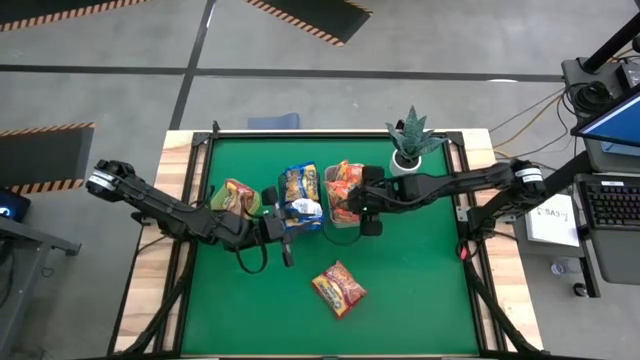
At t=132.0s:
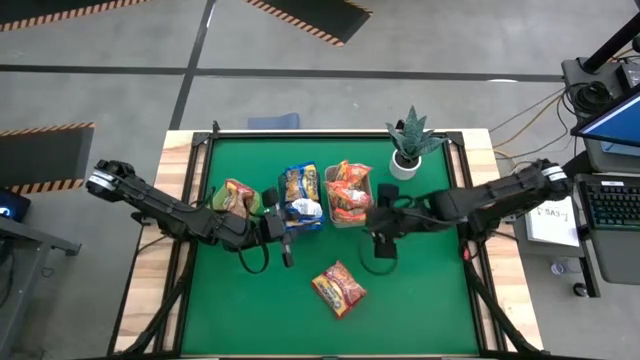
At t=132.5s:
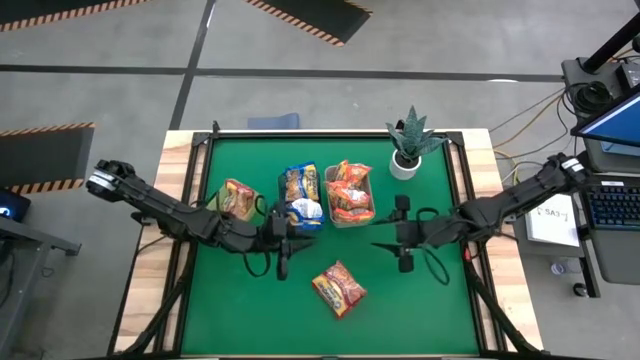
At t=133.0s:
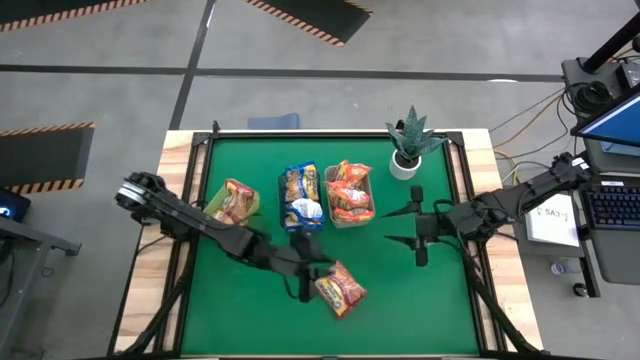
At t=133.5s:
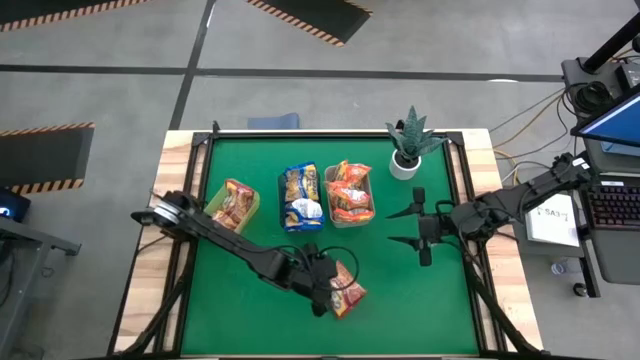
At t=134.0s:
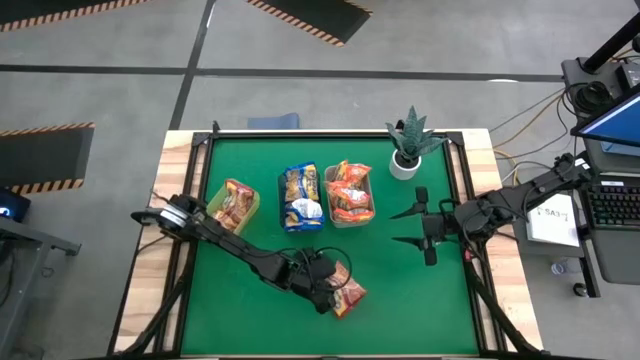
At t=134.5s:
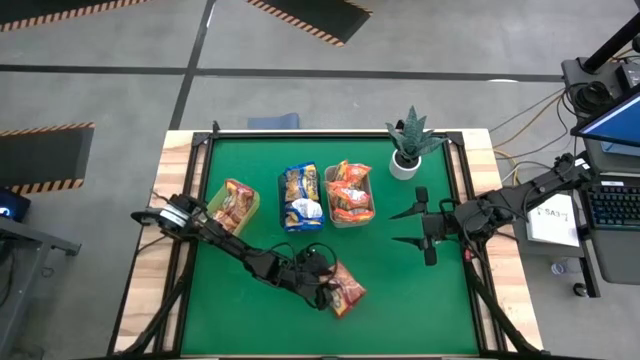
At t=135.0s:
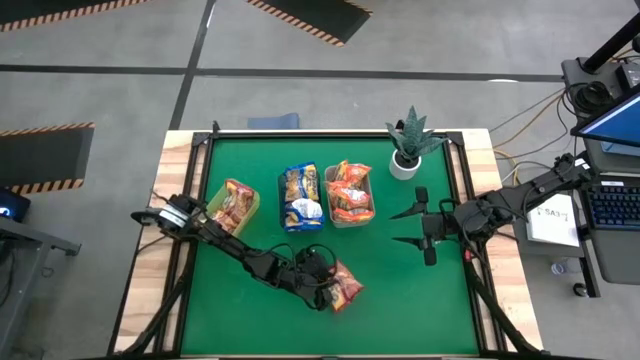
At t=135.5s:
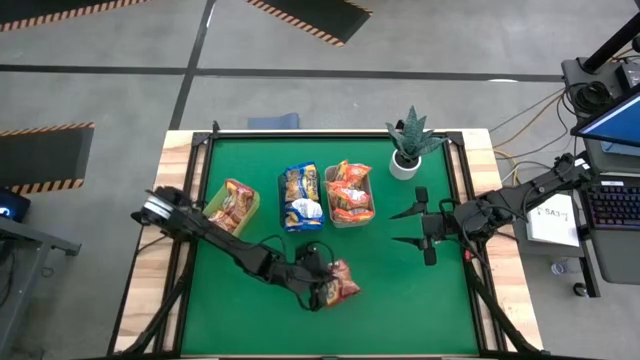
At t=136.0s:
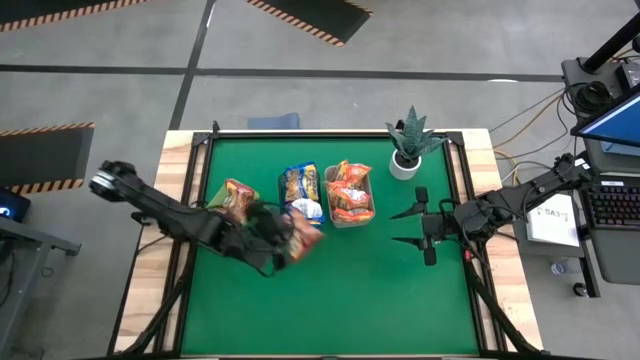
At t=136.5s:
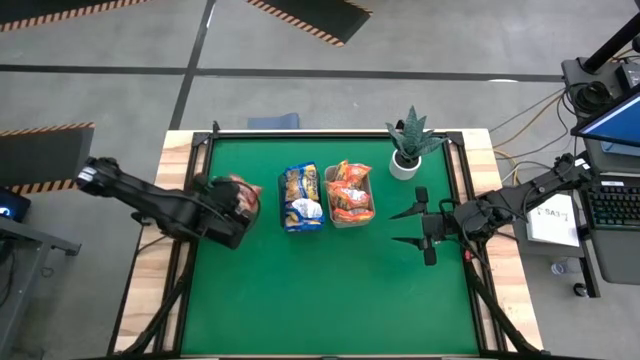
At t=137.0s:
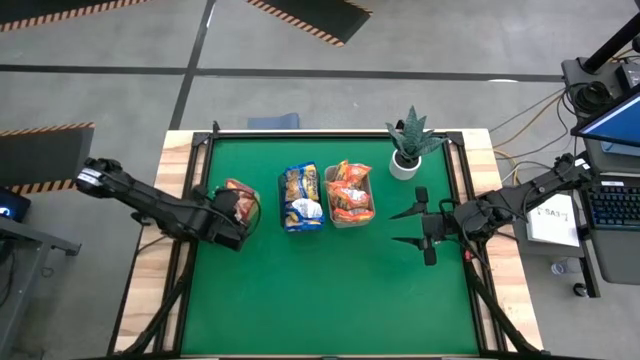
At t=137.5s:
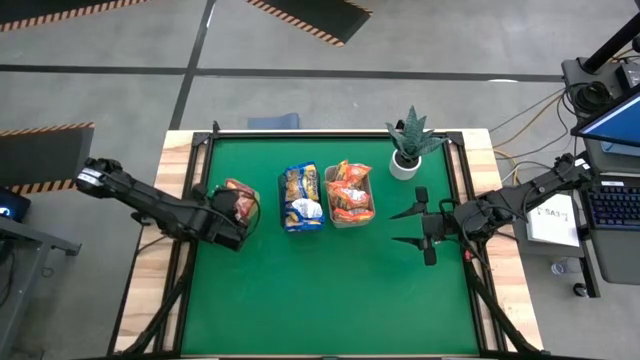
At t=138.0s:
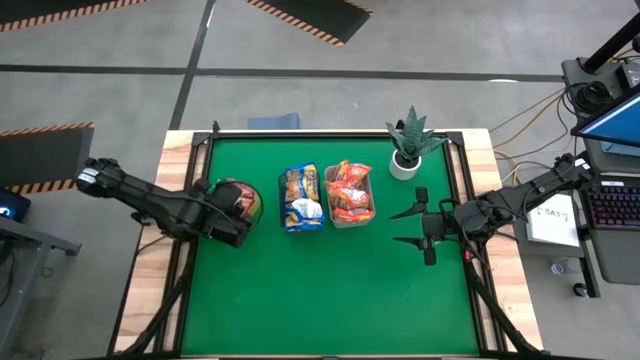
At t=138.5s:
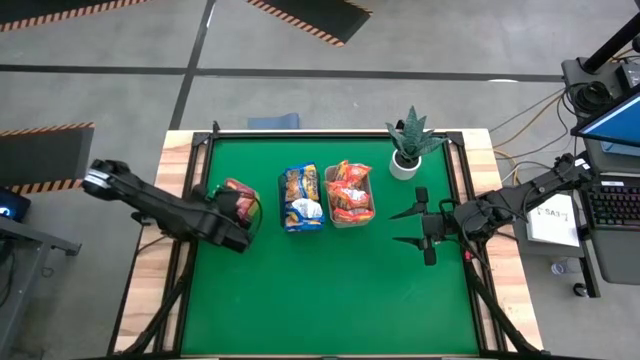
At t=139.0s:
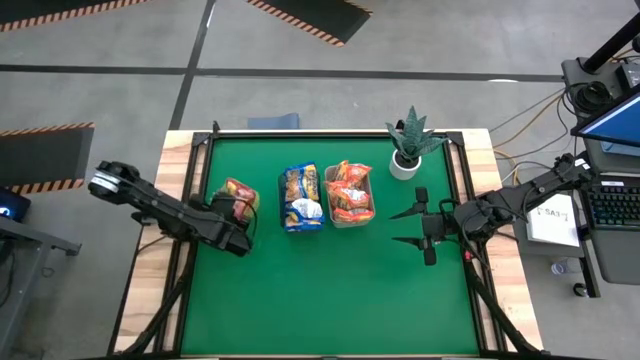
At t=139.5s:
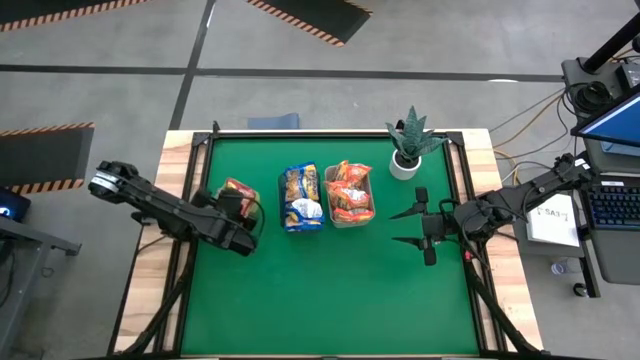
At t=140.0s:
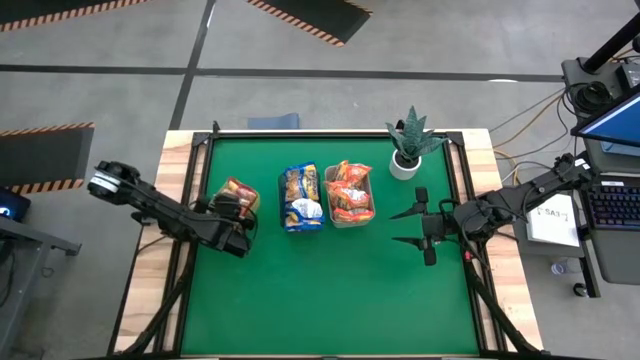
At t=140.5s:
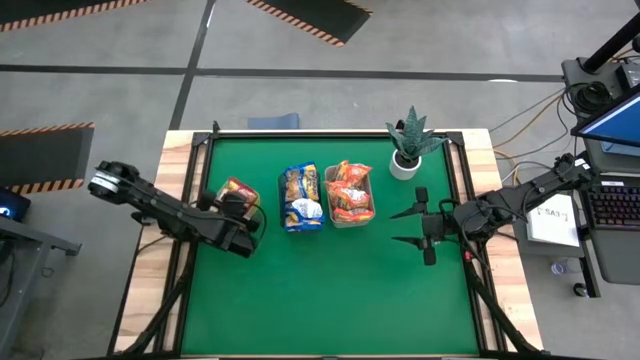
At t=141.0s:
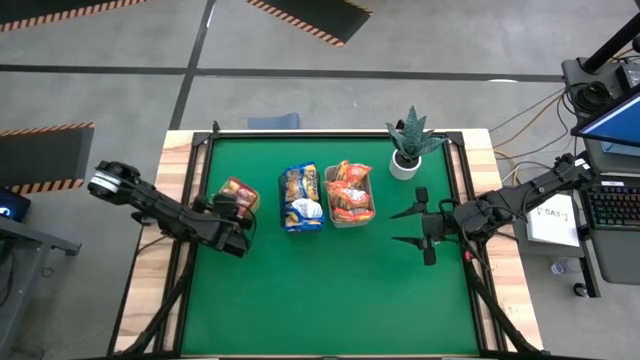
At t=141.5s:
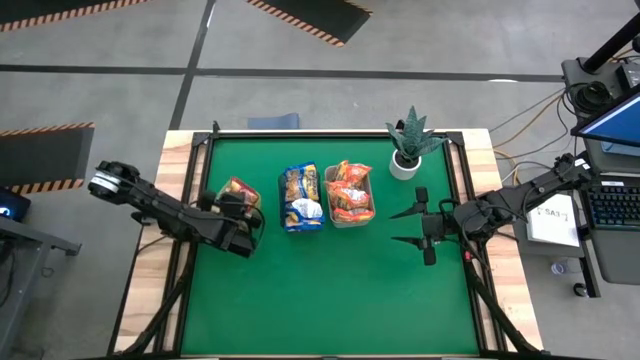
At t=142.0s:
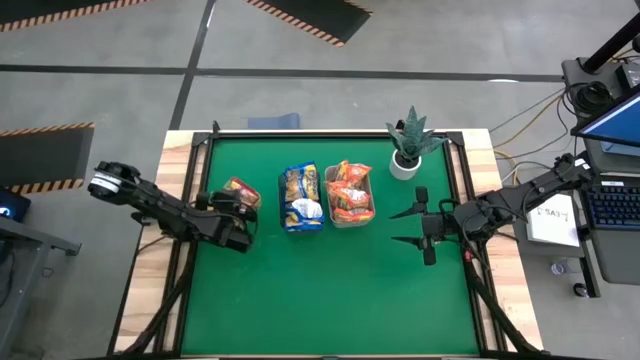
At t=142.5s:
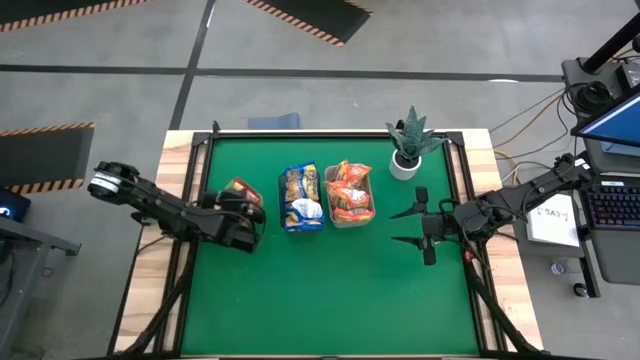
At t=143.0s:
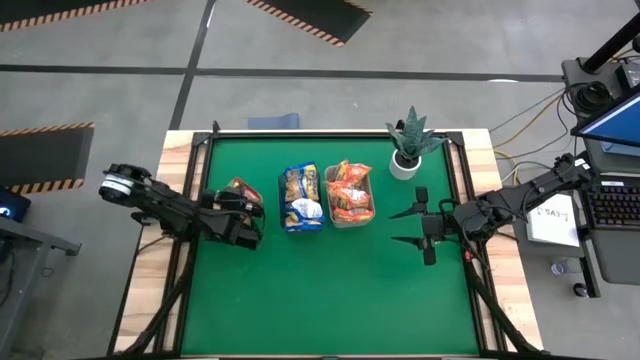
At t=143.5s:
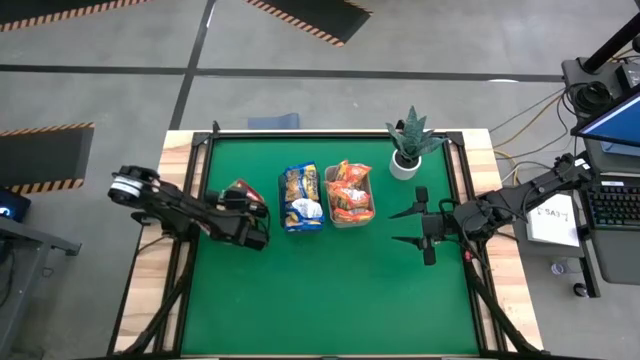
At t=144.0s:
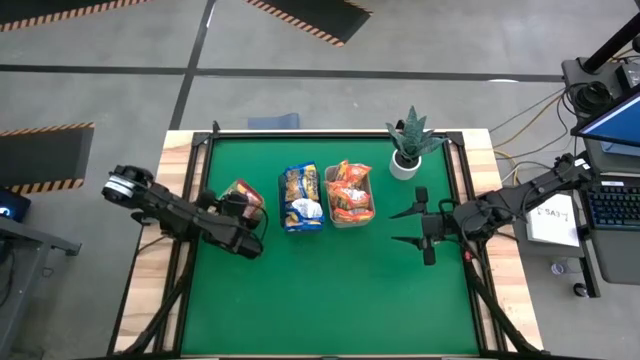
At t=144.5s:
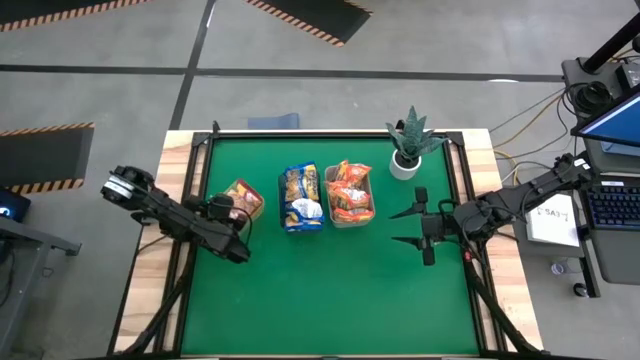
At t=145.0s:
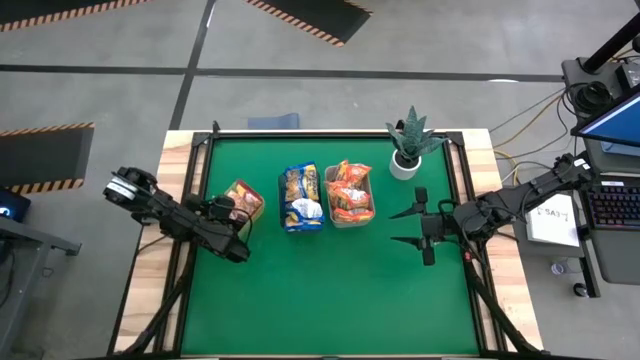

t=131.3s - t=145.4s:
Task: Sort Maruchan noodles
Put the red noodle pack into the yellow bin

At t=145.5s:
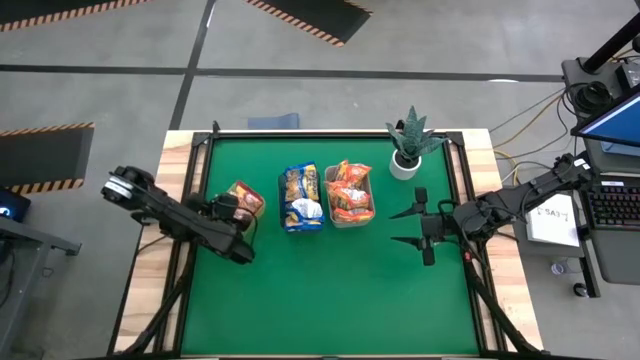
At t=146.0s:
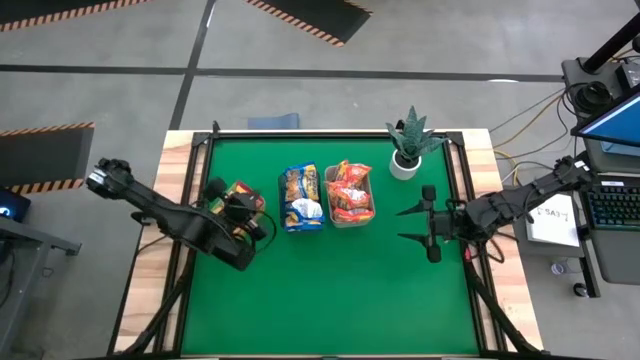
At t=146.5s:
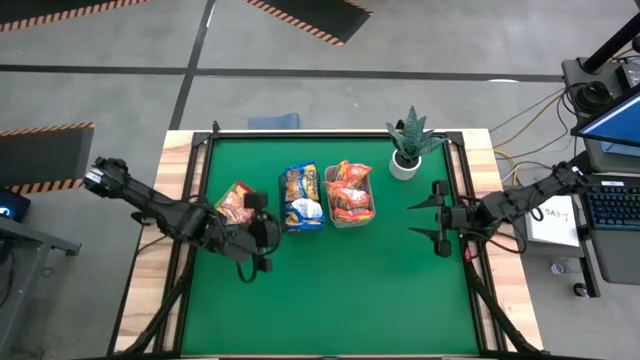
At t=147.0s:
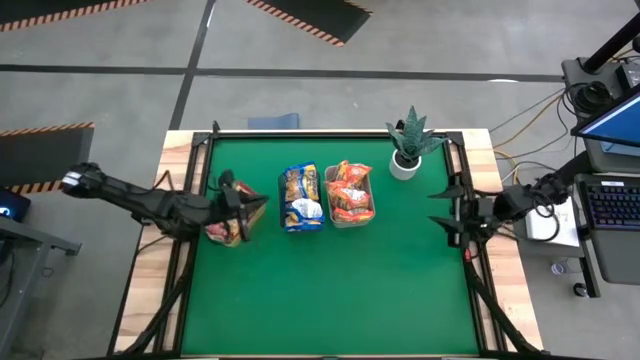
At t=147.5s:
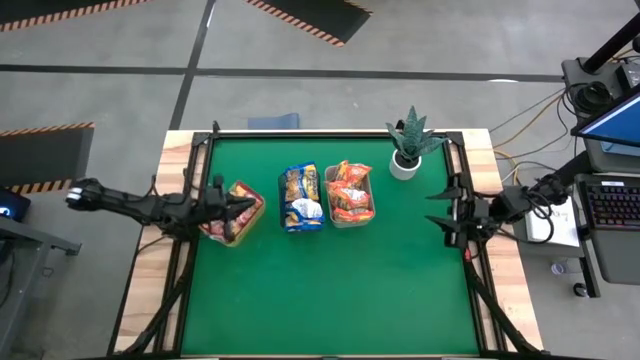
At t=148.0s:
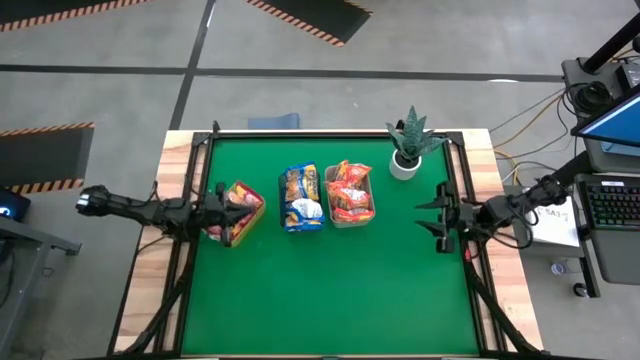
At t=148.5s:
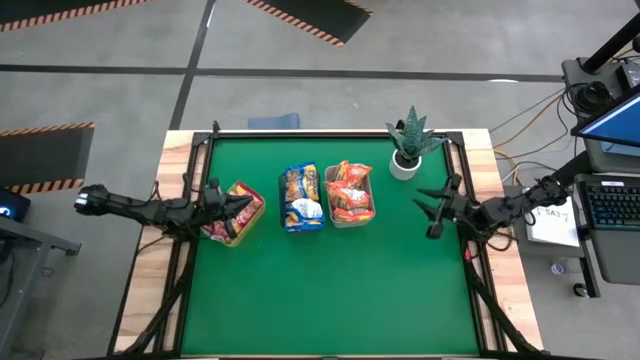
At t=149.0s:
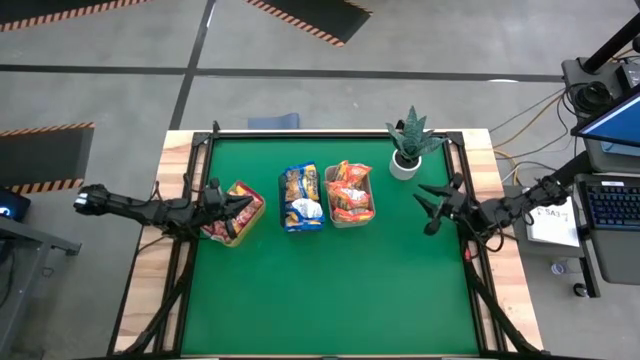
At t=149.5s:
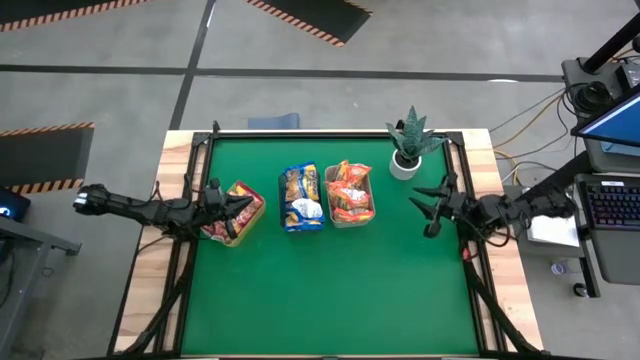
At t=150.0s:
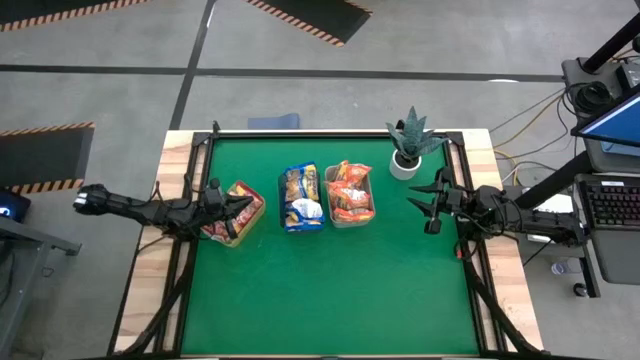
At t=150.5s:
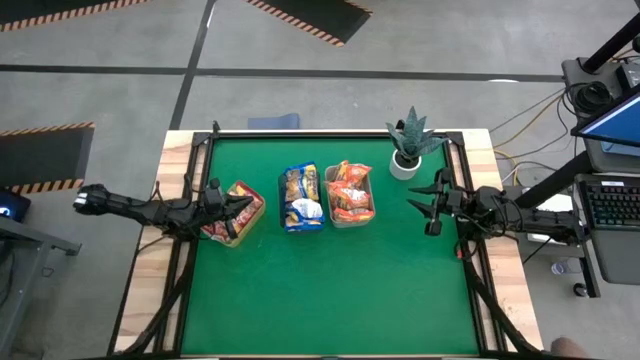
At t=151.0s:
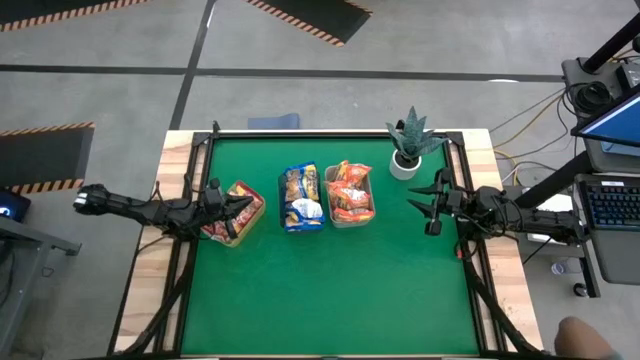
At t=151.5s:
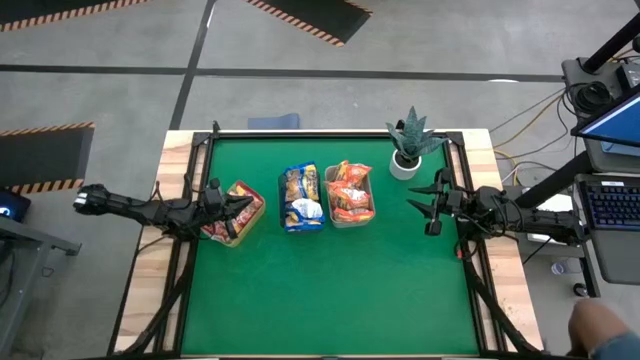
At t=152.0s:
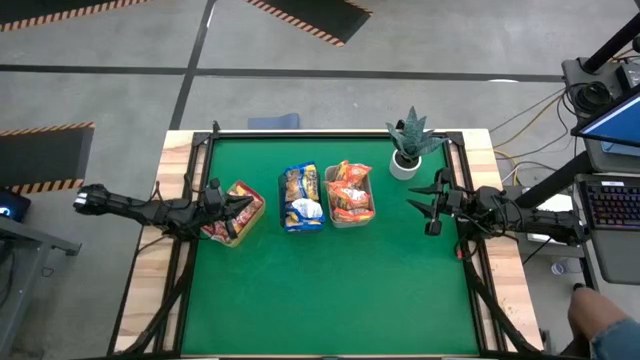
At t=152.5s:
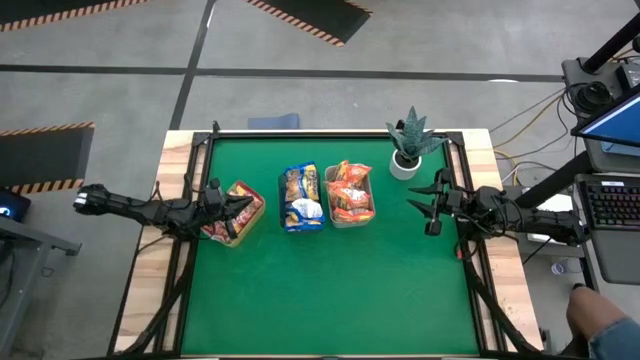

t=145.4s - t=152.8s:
Return to Home Position
